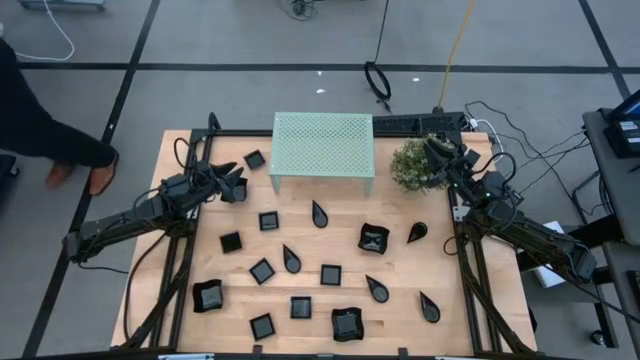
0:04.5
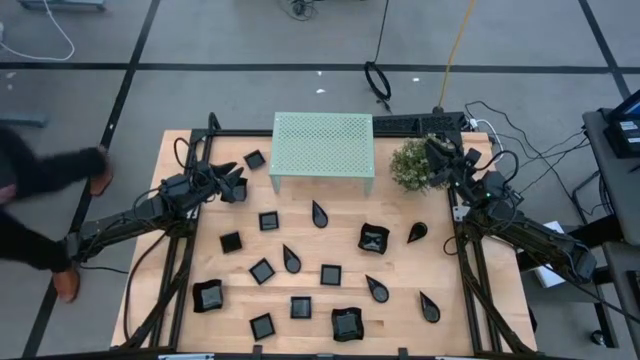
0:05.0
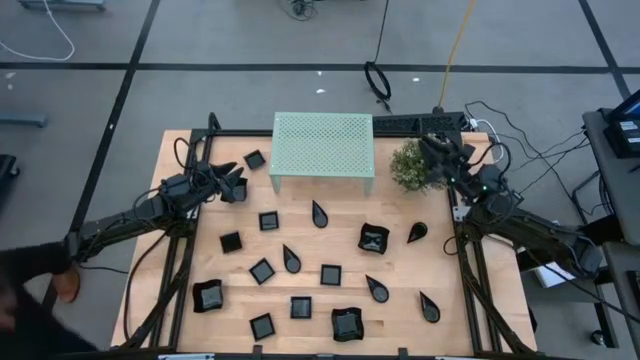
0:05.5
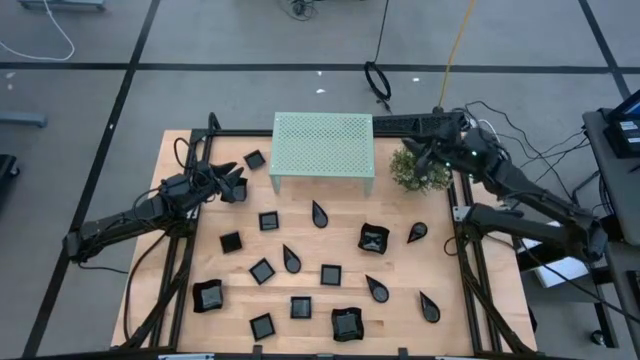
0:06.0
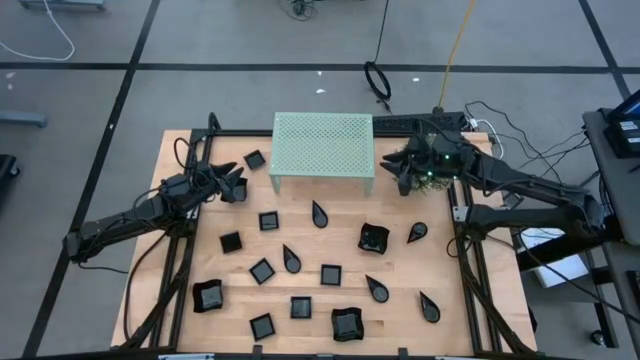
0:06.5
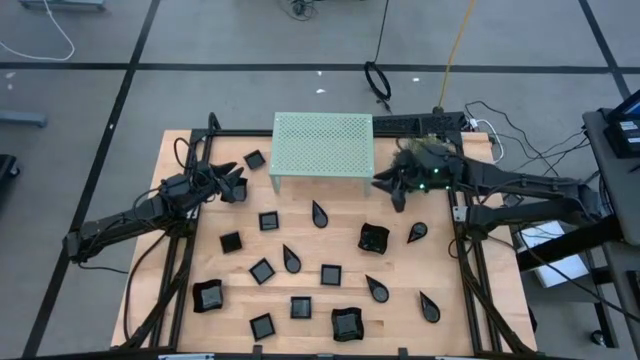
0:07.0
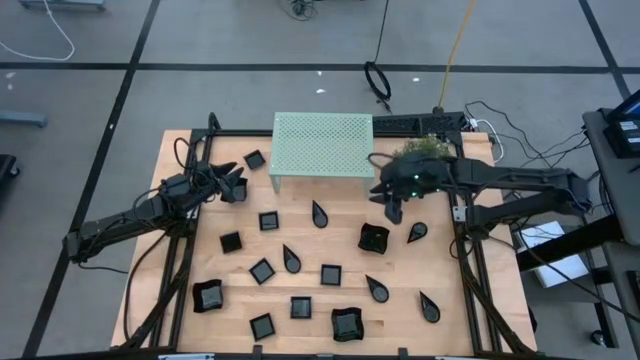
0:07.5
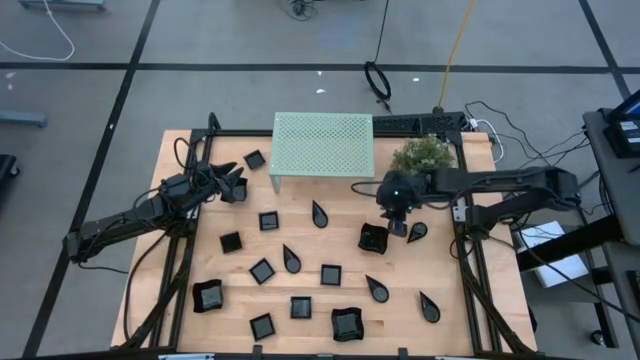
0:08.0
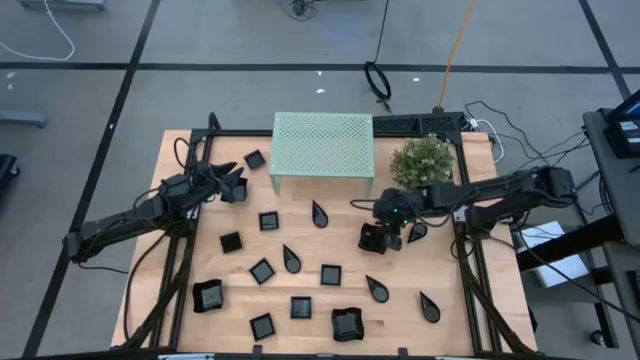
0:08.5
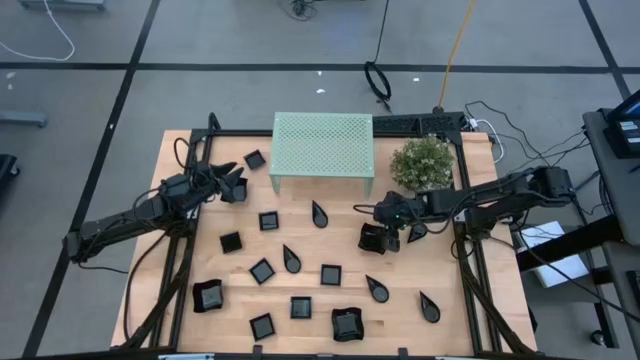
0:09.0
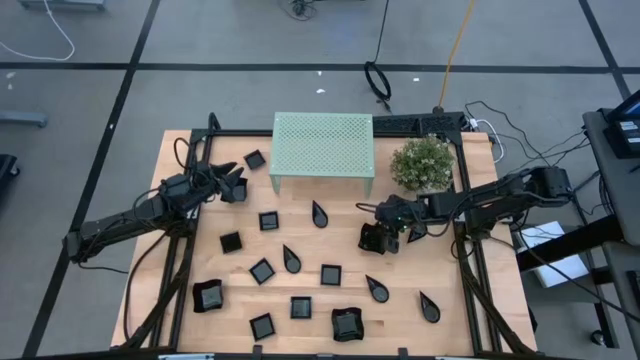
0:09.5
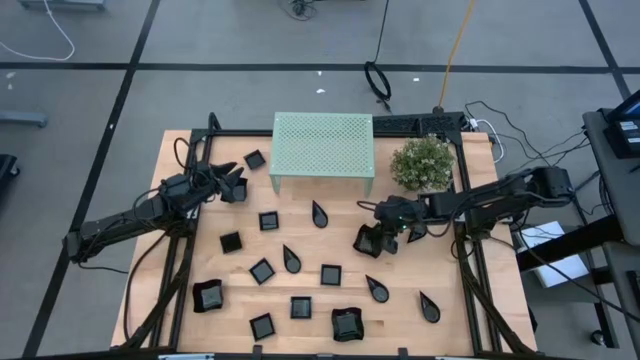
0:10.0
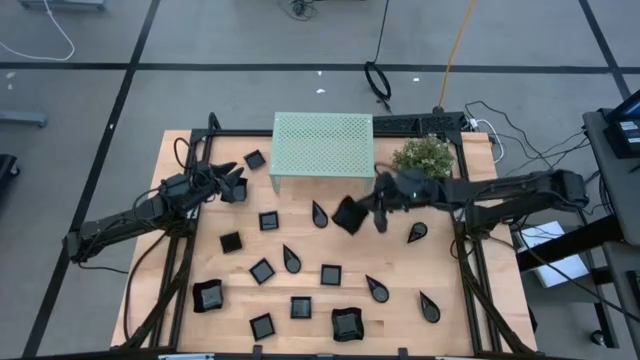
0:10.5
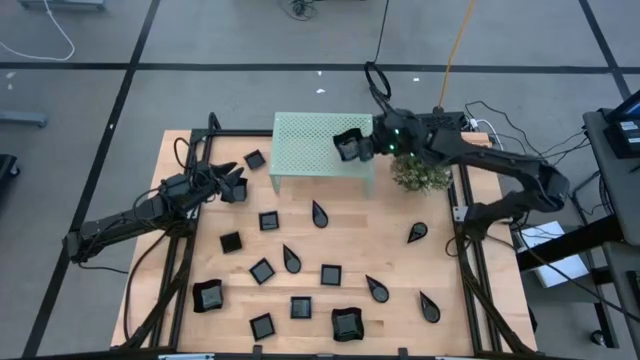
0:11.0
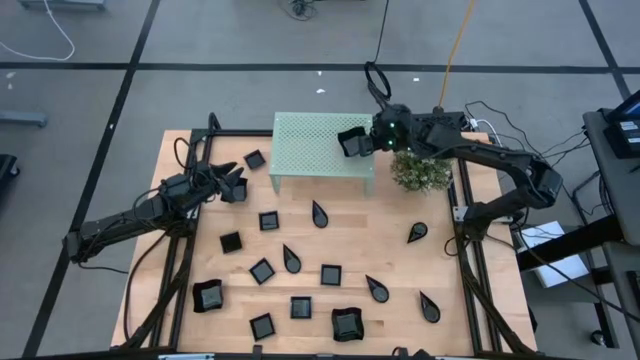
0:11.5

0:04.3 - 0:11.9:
Task: Pick & Place Mini shaped plates
Put the black distorted square plate on the shelf

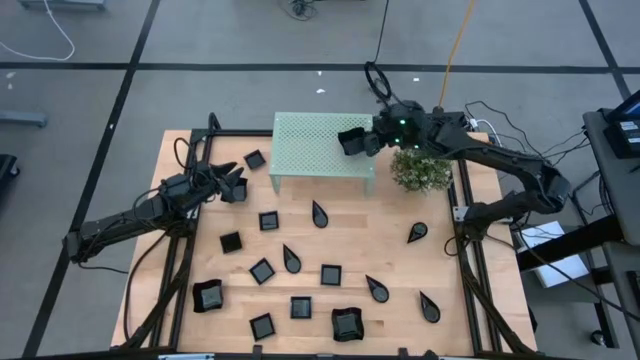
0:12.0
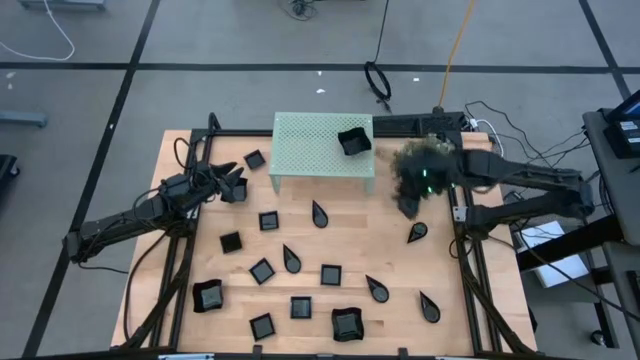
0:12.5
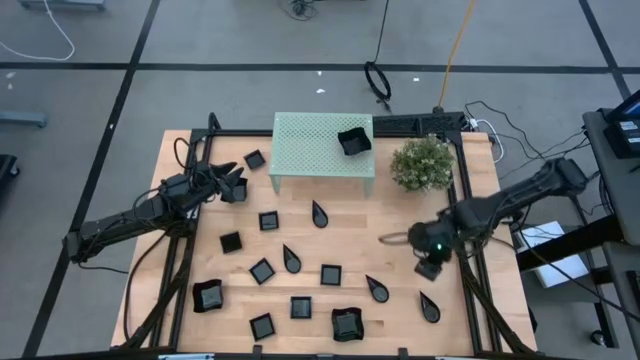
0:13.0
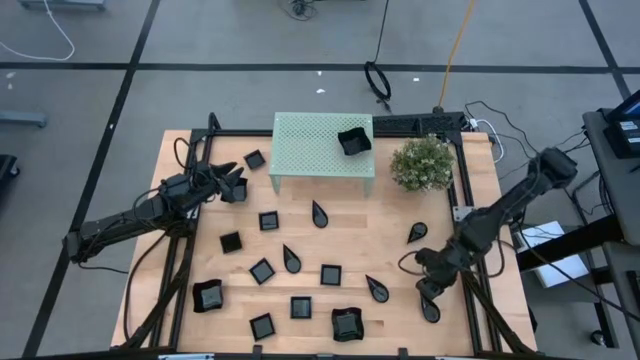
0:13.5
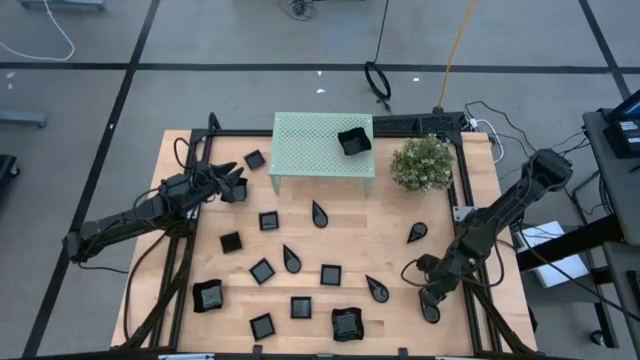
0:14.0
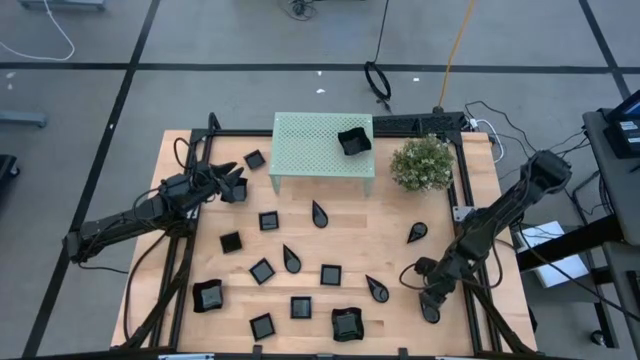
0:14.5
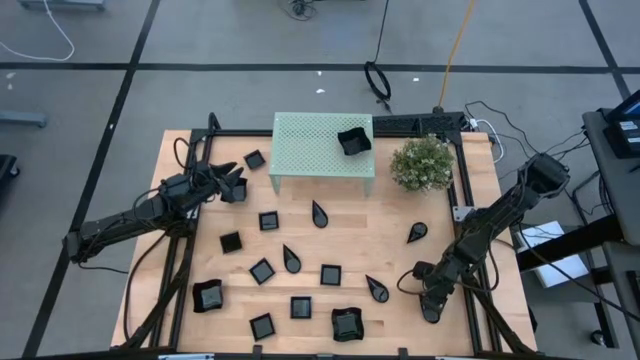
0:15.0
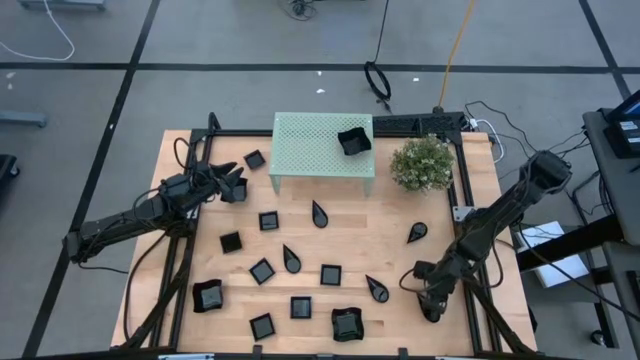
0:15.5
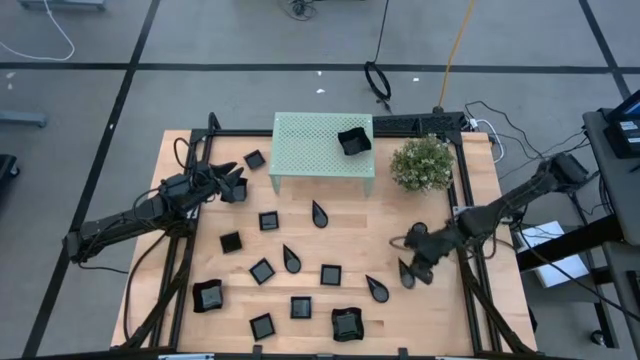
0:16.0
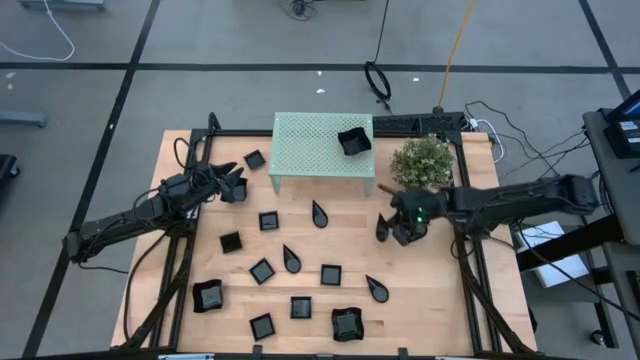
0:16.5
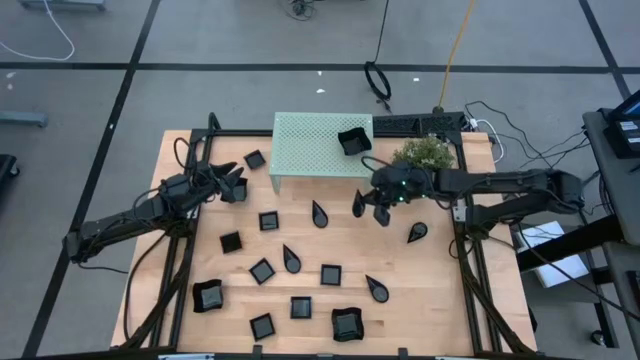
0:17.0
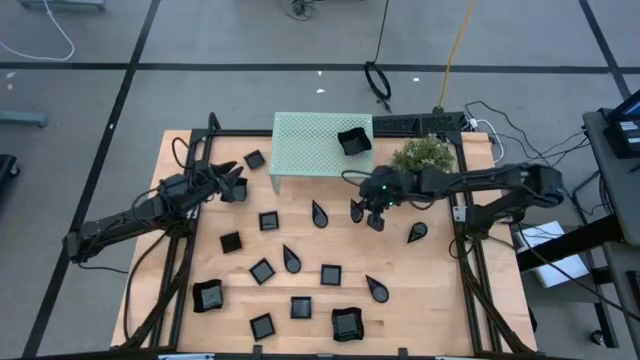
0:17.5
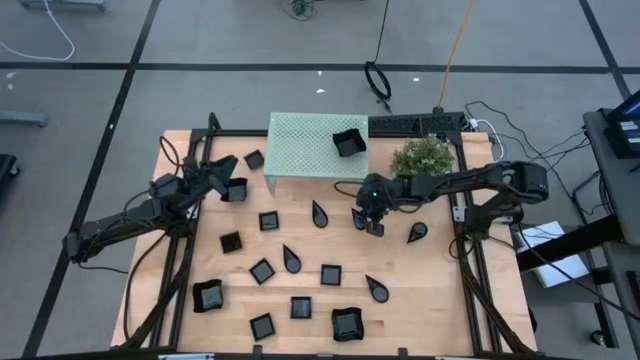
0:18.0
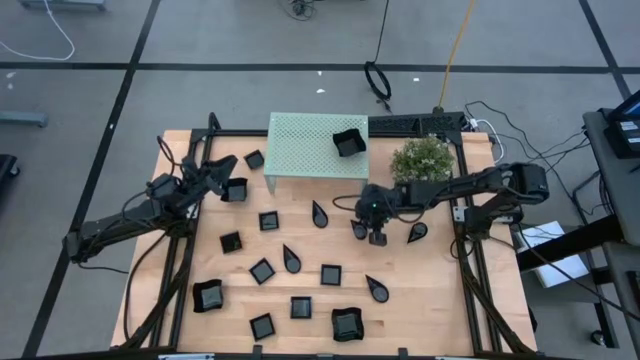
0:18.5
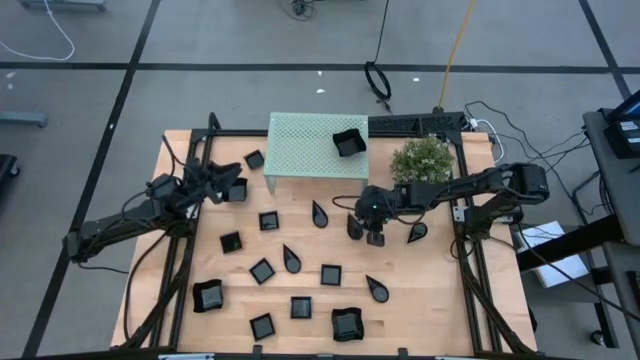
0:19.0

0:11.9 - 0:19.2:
Put the black drop-shaped plate on the shelf

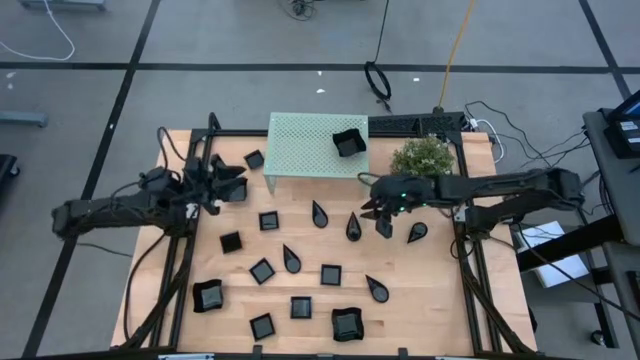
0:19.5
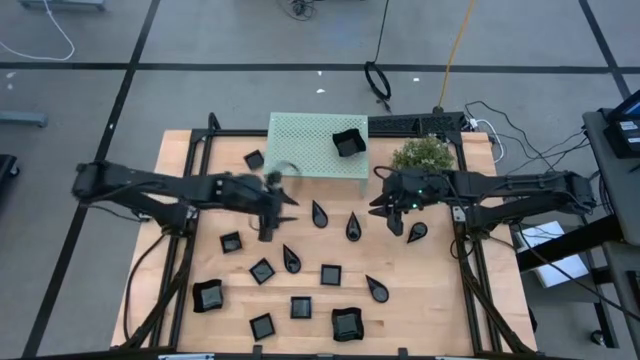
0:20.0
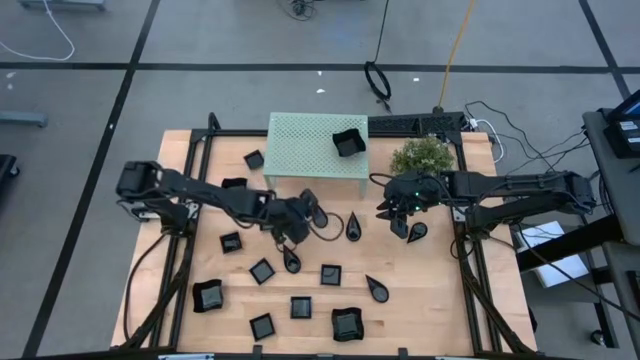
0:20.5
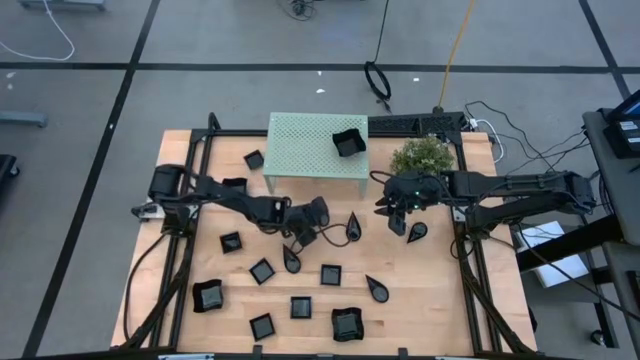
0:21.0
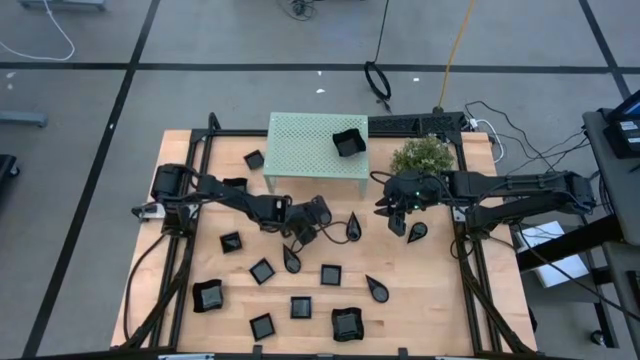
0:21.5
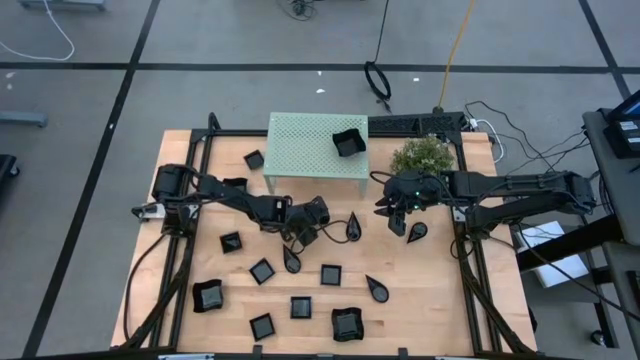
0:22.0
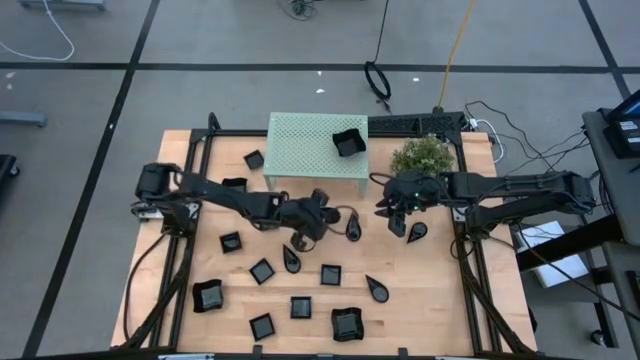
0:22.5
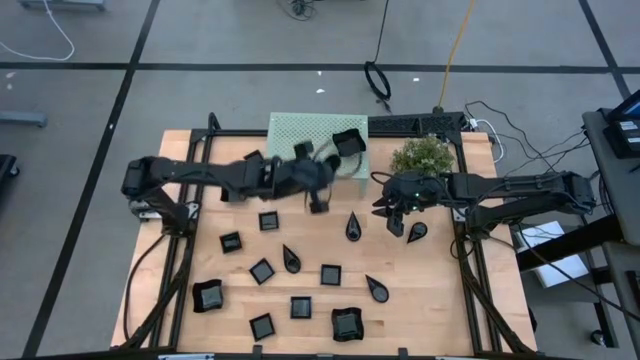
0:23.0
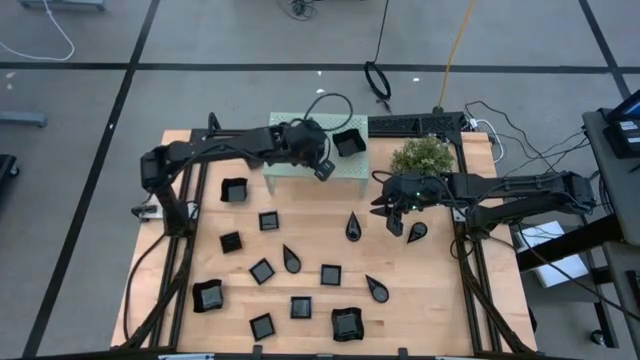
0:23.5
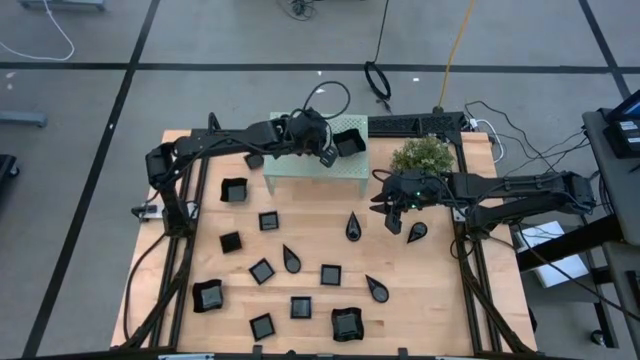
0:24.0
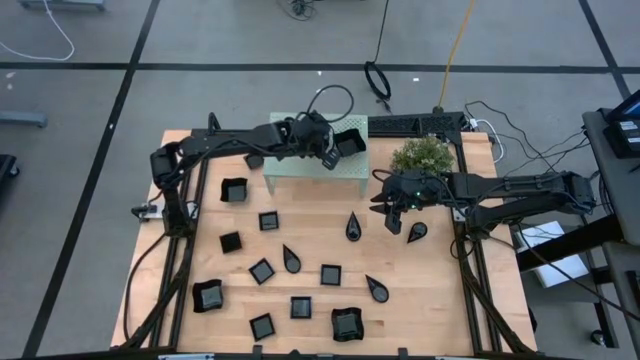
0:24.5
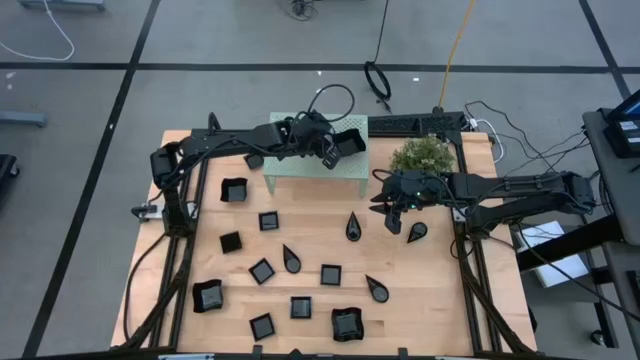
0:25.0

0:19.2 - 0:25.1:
Put the black drop-shaped plate on the shelf
